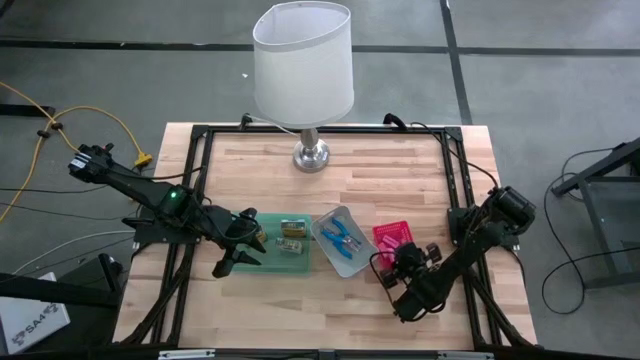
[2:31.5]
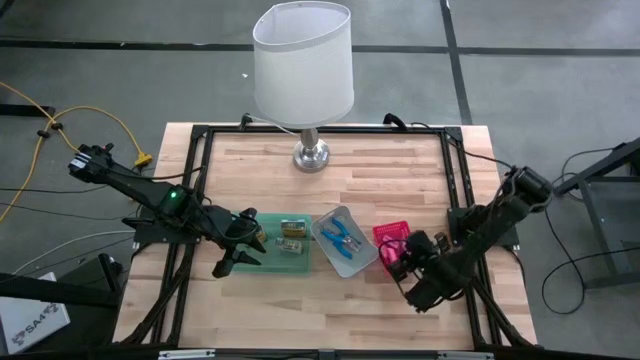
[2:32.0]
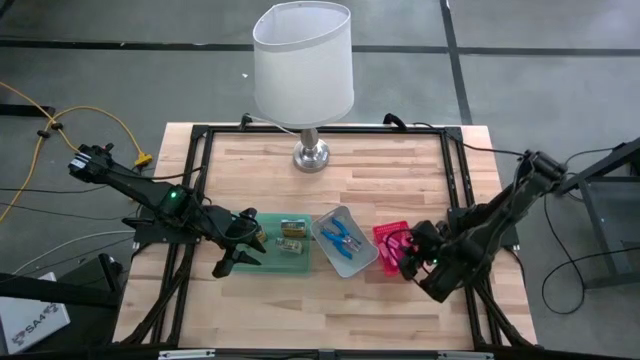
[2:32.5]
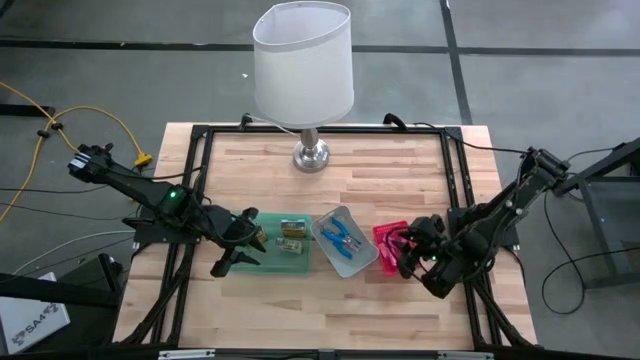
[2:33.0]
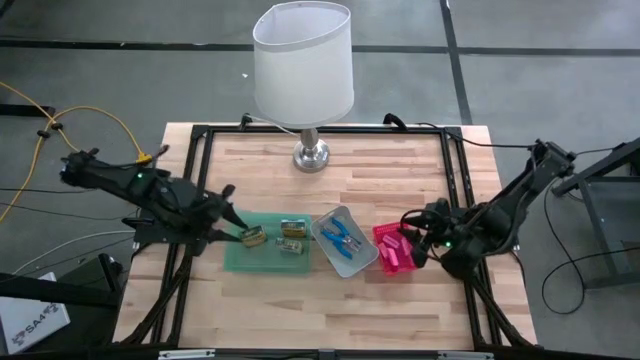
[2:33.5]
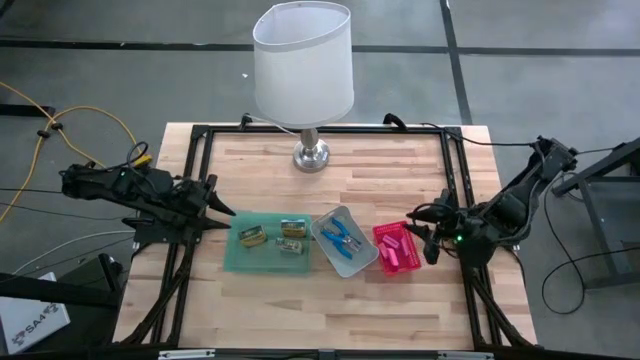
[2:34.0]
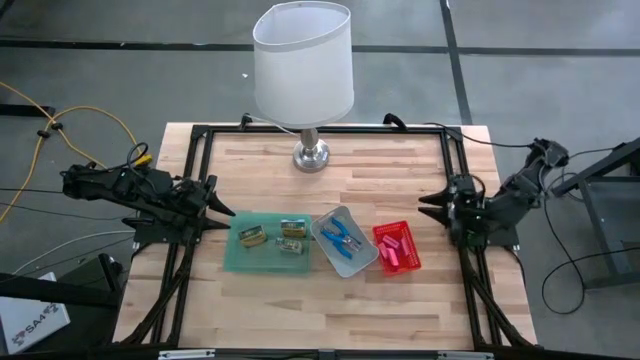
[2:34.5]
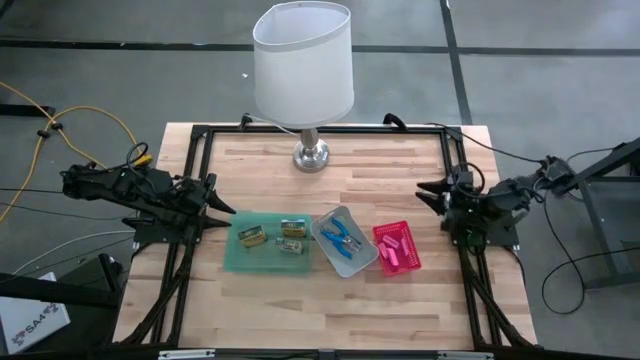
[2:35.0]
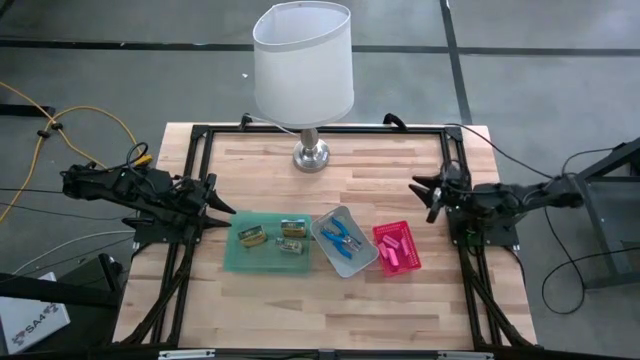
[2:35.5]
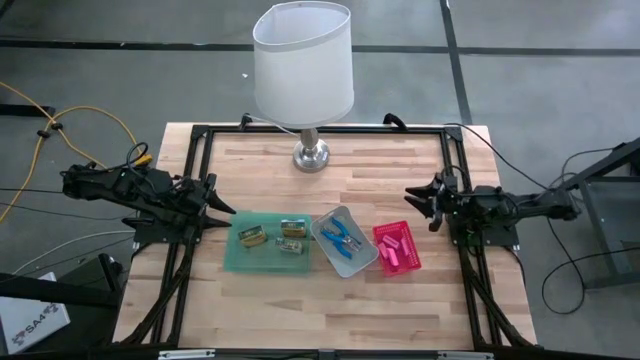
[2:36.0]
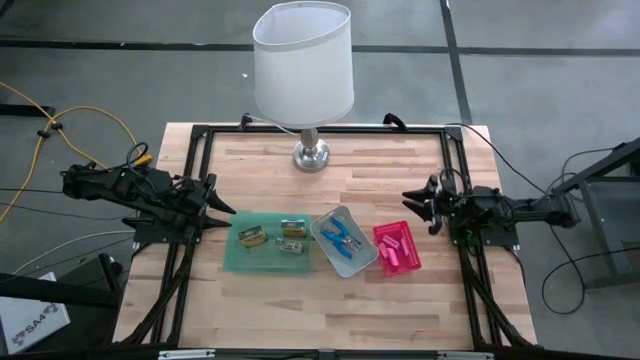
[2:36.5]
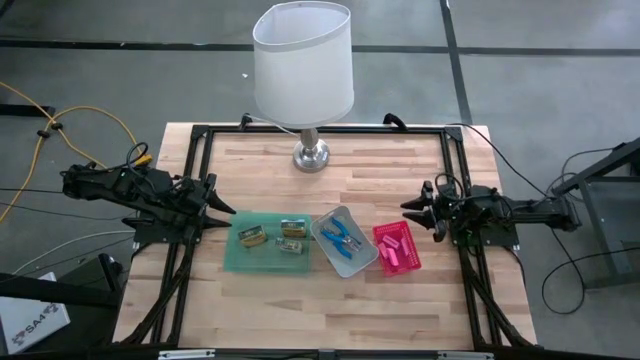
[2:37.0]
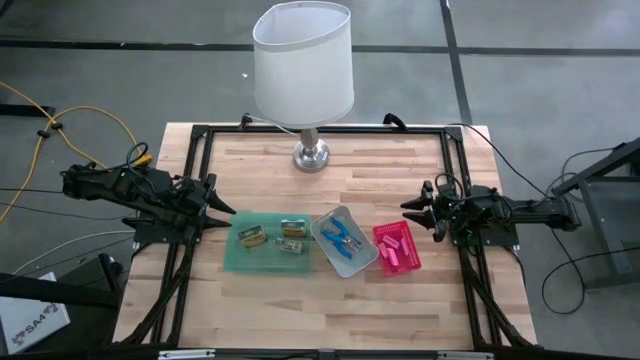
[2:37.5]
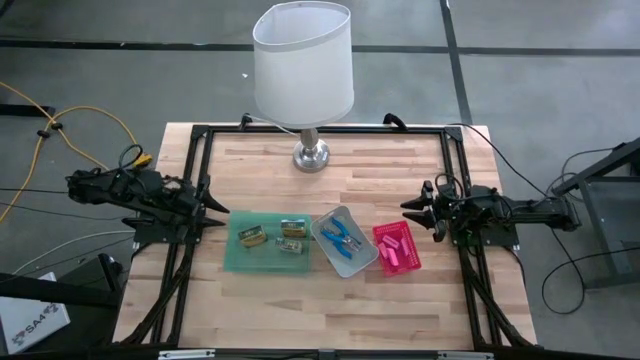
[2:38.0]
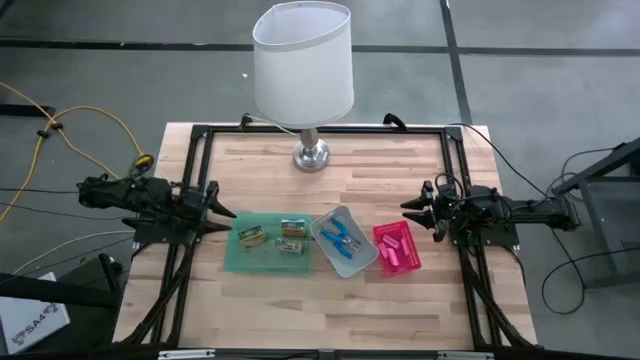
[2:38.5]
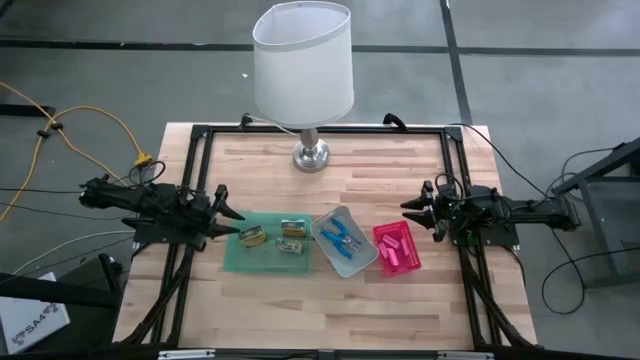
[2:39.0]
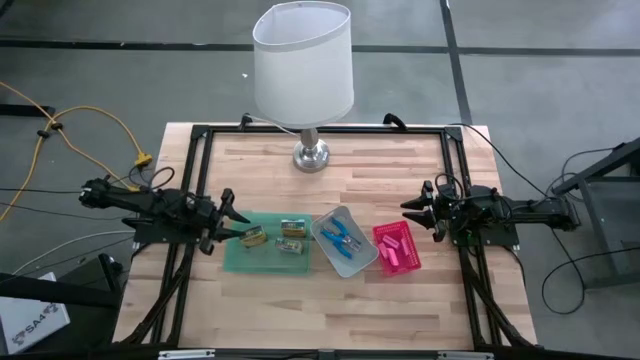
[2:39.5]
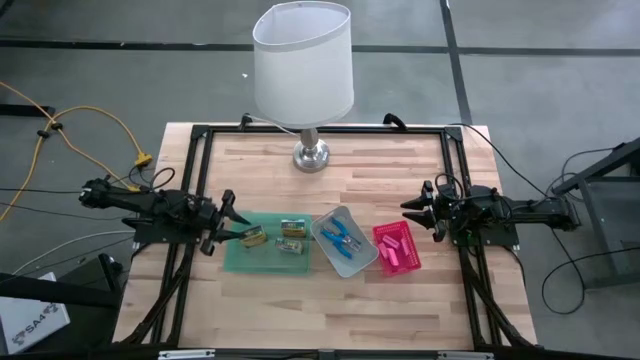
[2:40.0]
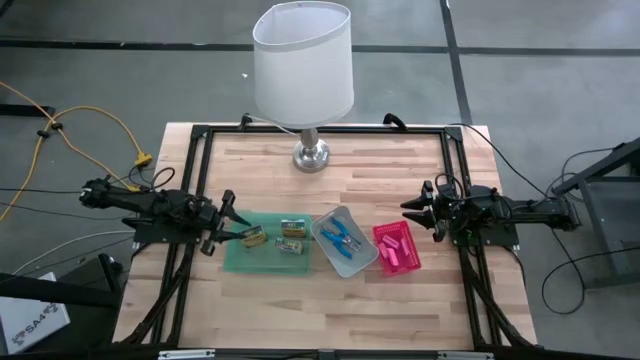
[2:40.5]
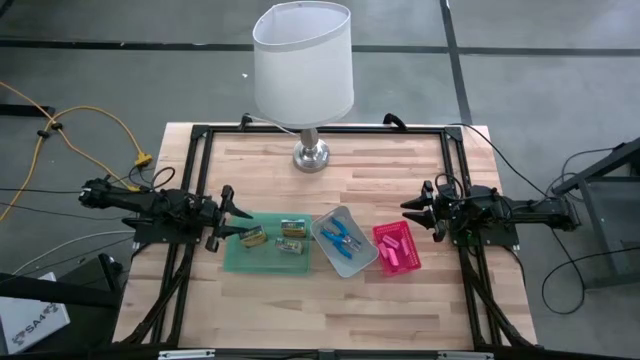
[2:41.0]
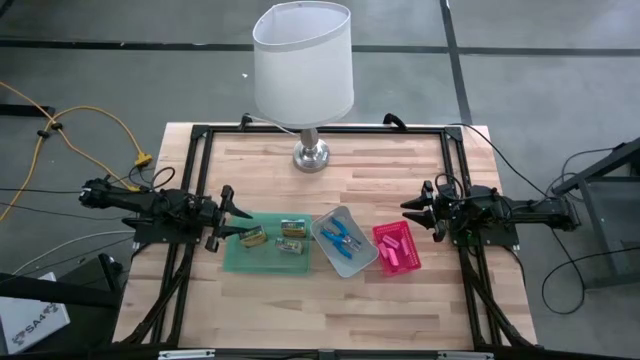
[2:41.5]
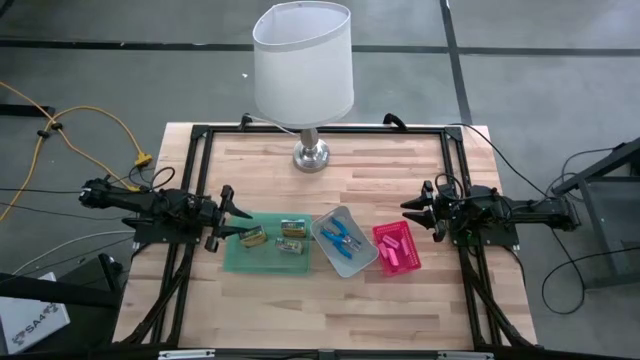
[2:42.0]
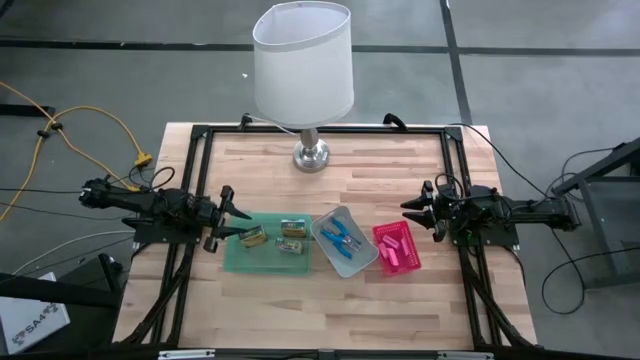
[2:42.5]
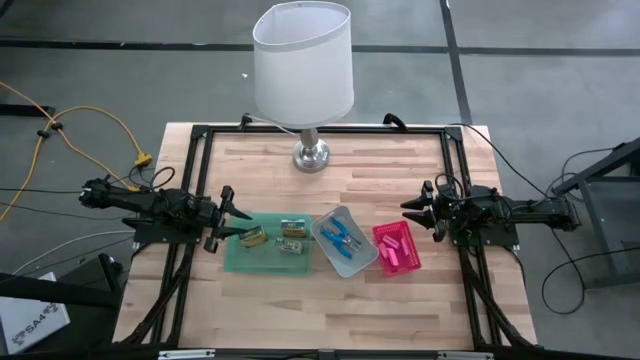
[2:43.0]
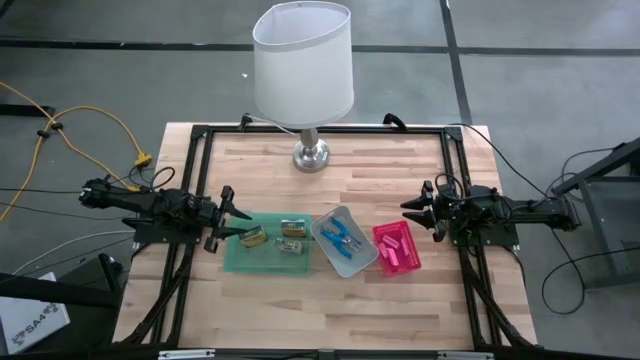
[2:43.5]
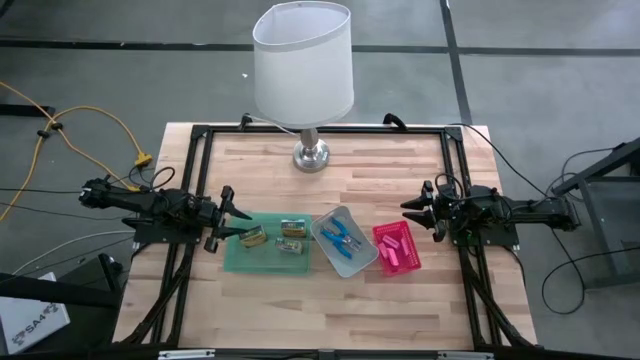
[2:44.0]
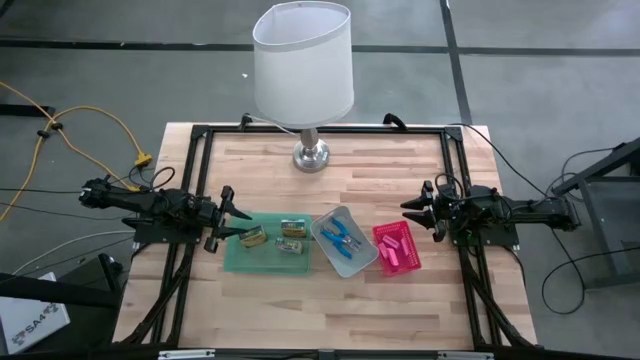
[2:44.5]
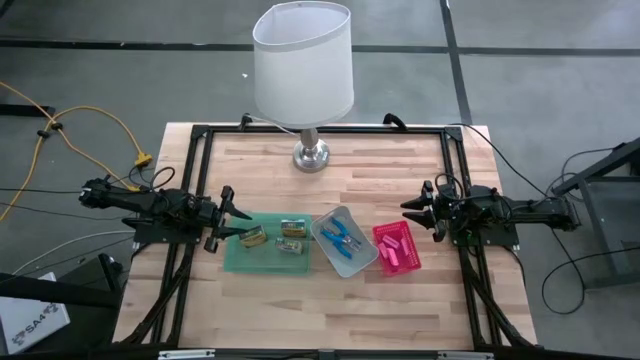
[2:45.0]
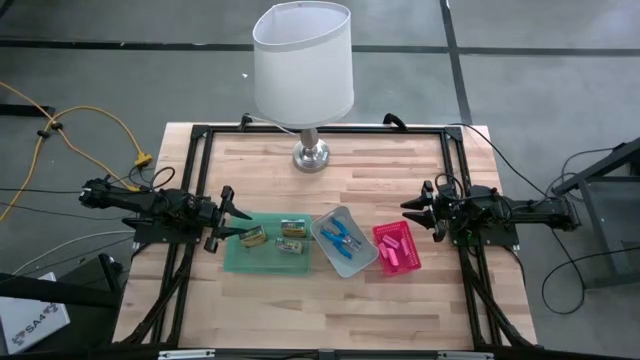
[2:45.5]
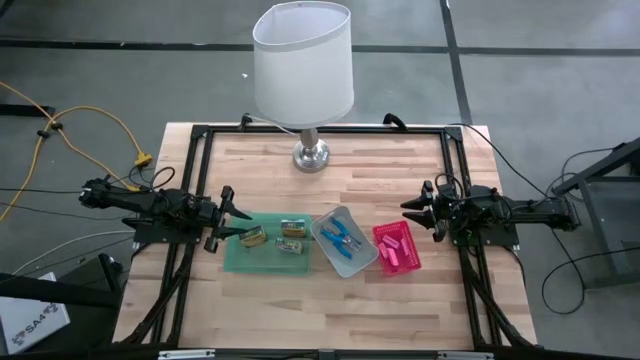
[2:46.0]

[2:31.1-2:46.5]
Task: Pick & Place School Supplies
Return to Home Position

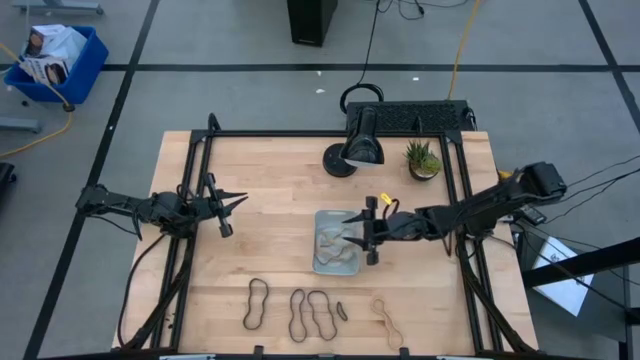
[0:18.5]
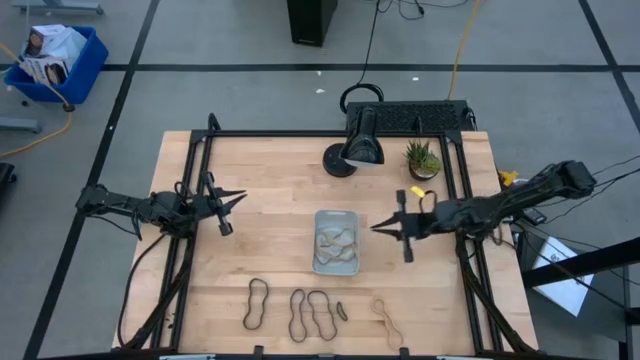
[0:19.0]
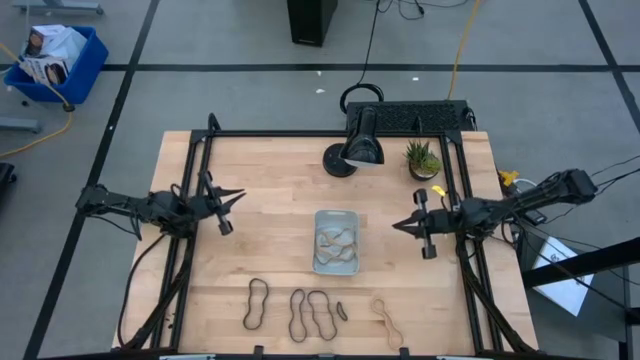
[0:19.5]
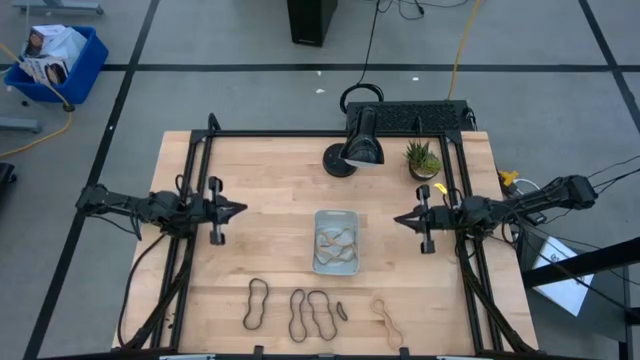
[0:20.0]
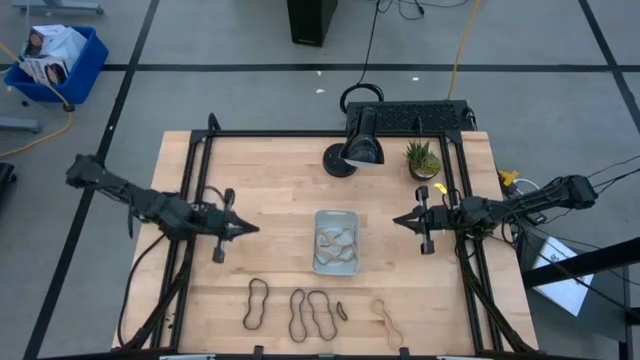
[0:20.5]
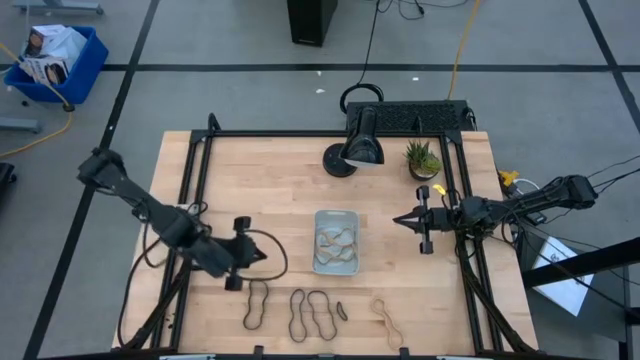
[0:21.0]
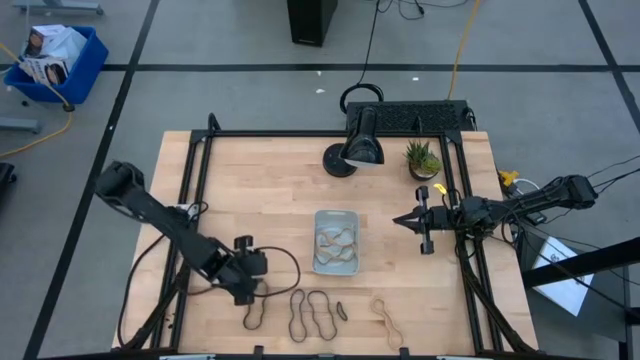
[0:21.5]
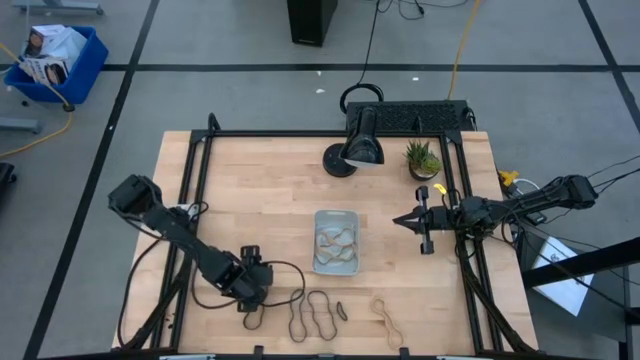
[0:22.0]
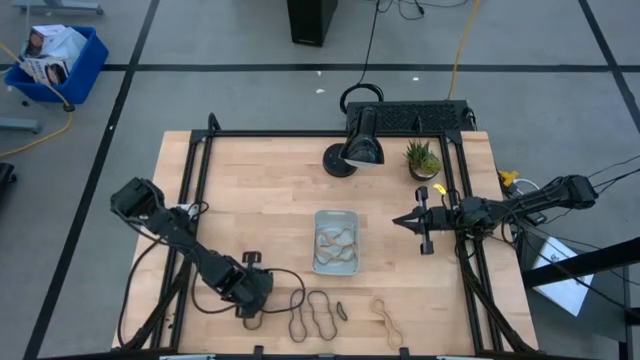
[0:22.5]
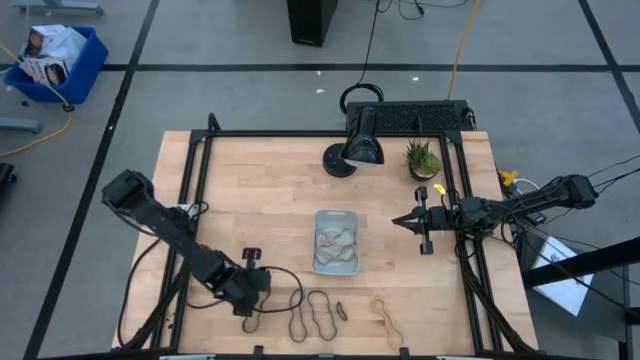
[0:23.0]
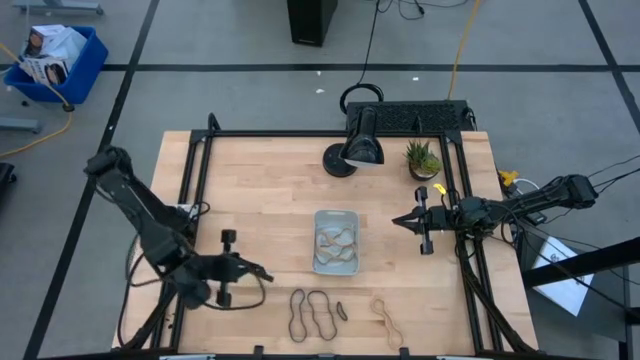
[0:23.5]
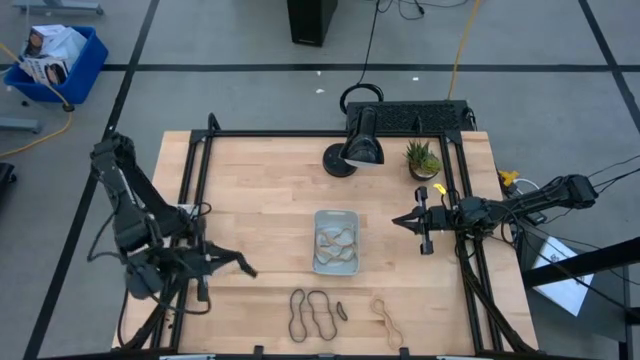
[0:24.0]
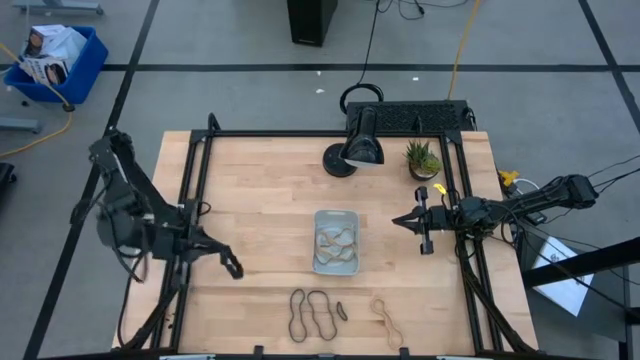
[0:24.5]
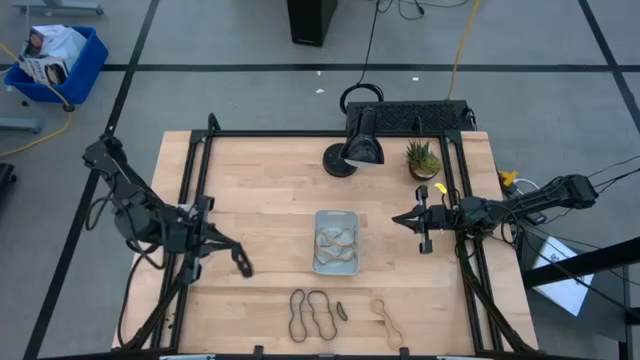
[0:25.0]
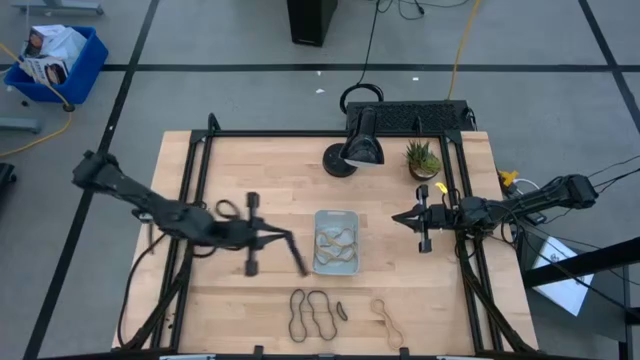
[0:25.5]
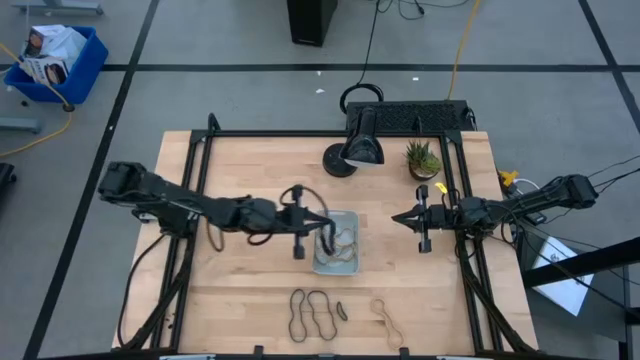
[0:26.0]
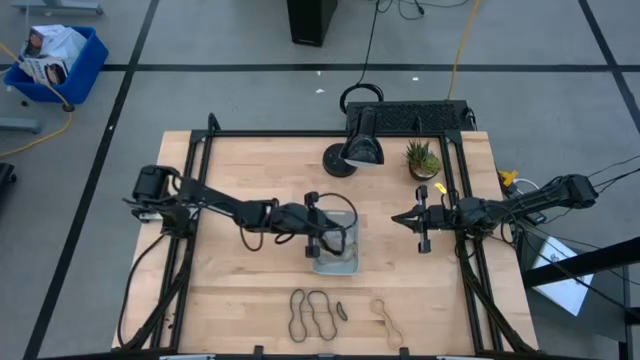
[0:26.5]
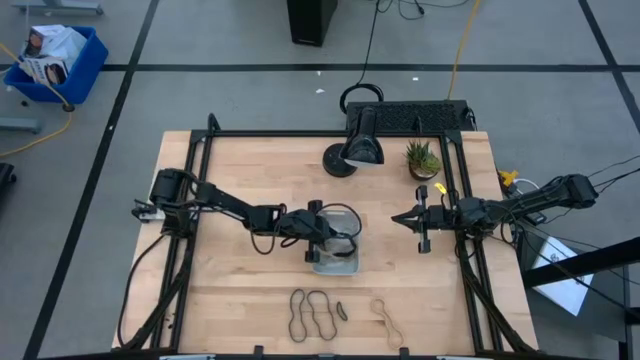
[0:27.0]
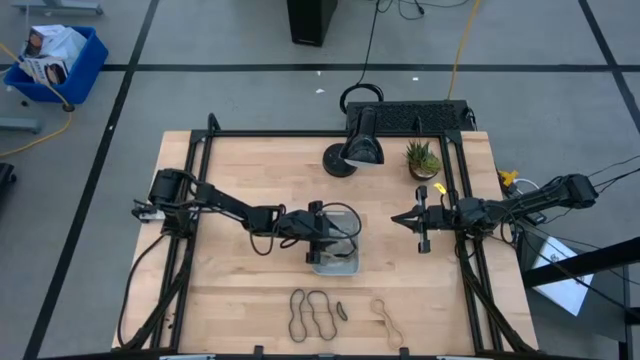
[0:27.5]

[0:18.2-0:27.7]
Task: Pick and place rubber bands into bin
Put the black rubber band into the gray container
